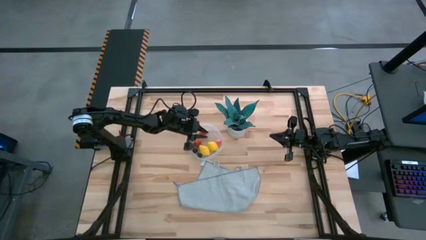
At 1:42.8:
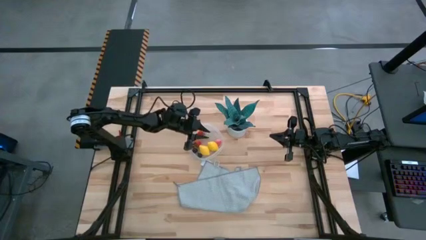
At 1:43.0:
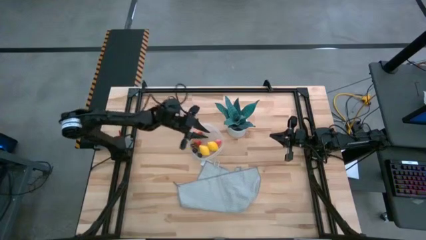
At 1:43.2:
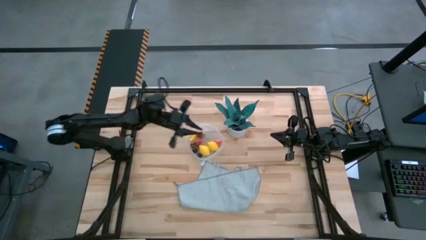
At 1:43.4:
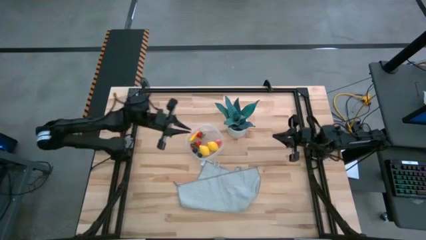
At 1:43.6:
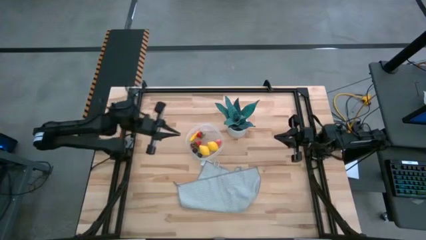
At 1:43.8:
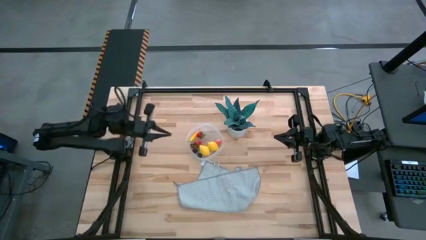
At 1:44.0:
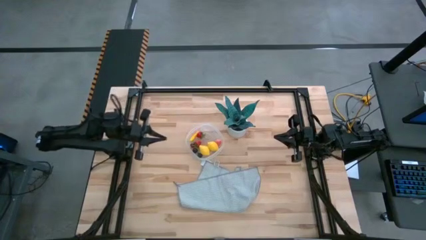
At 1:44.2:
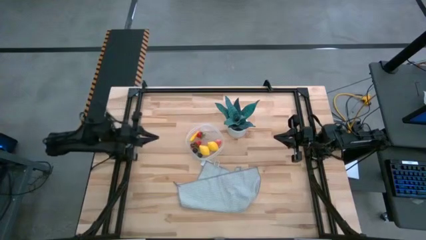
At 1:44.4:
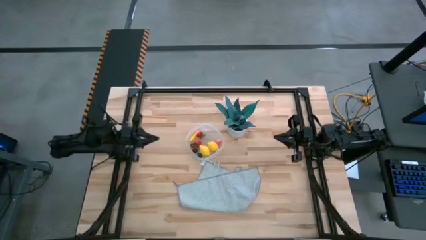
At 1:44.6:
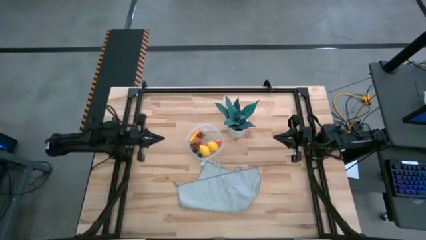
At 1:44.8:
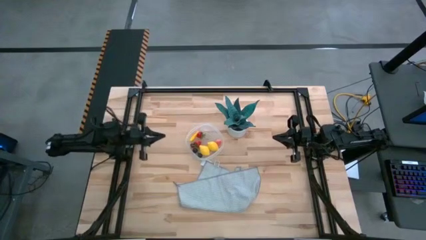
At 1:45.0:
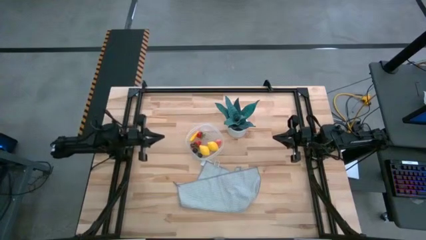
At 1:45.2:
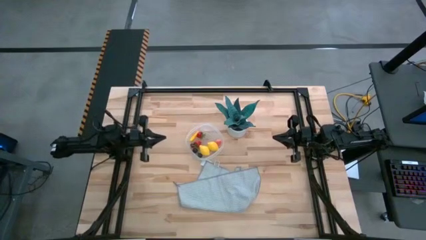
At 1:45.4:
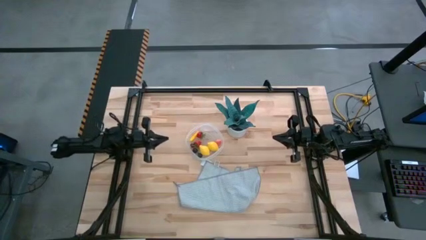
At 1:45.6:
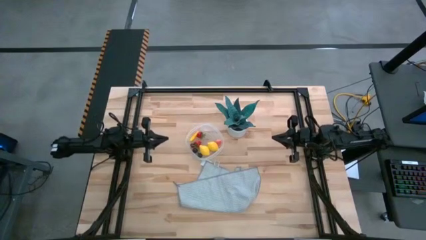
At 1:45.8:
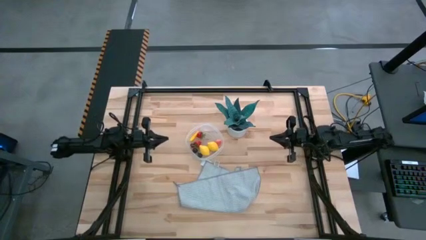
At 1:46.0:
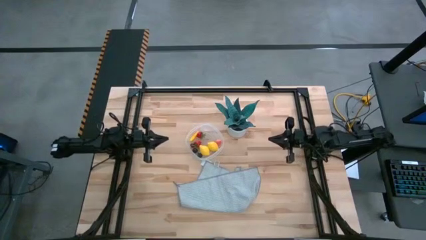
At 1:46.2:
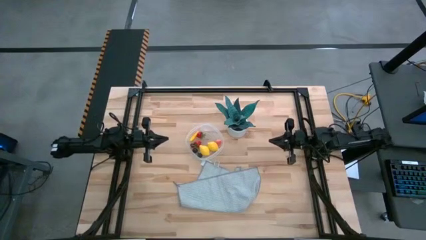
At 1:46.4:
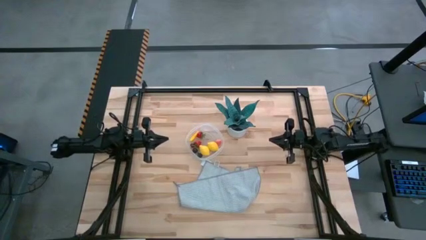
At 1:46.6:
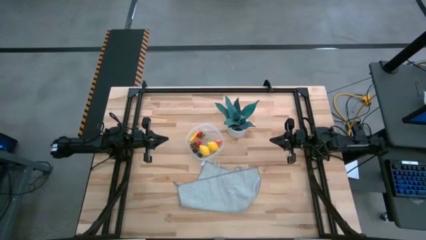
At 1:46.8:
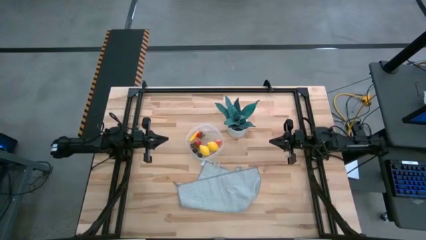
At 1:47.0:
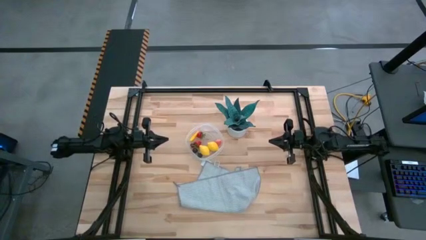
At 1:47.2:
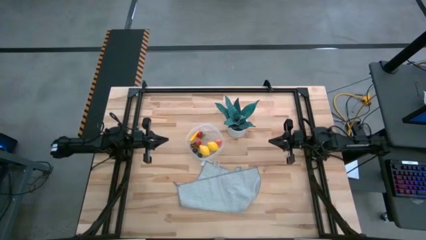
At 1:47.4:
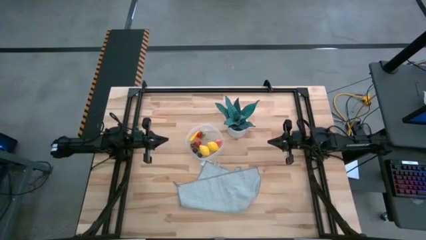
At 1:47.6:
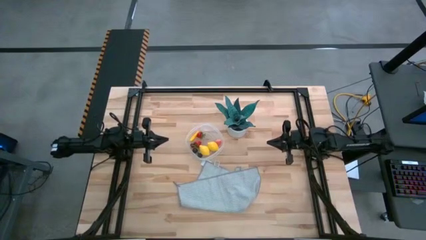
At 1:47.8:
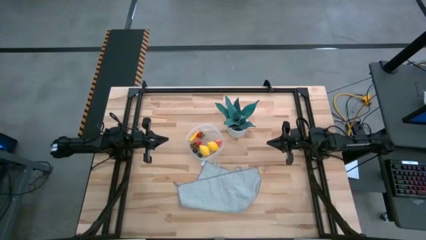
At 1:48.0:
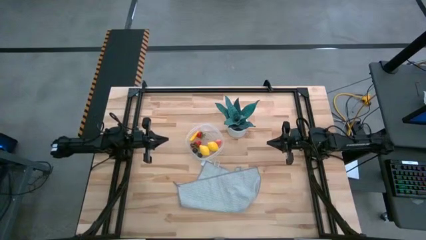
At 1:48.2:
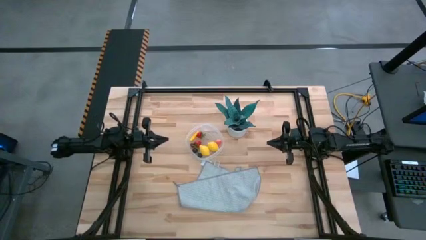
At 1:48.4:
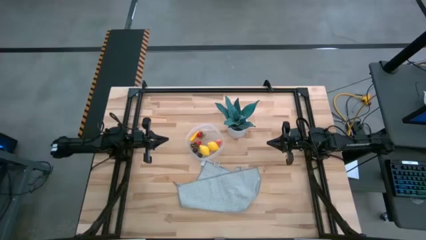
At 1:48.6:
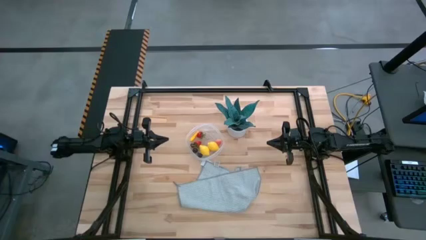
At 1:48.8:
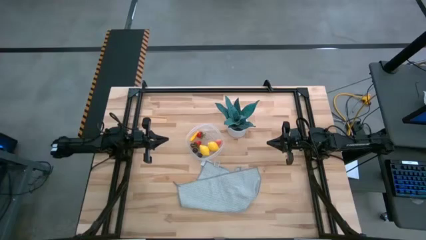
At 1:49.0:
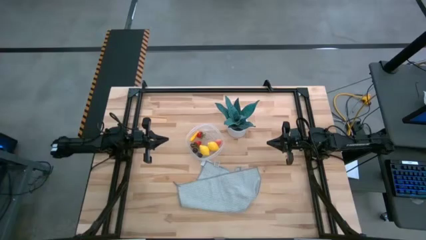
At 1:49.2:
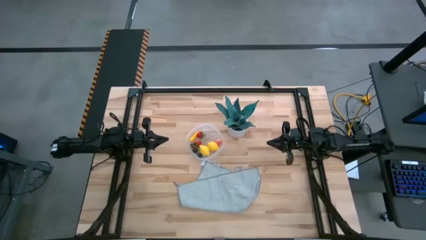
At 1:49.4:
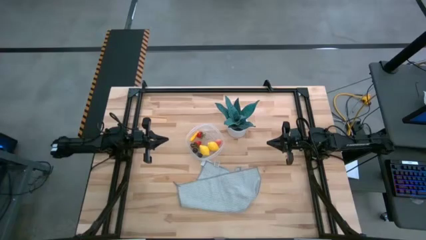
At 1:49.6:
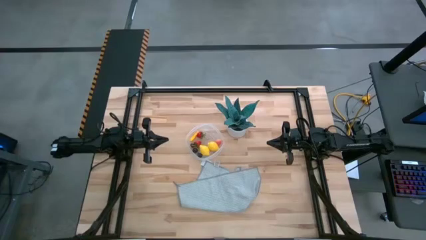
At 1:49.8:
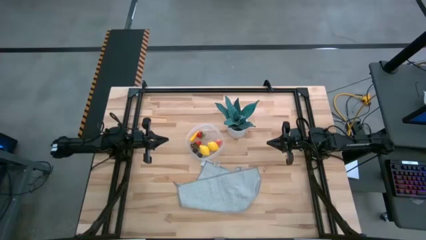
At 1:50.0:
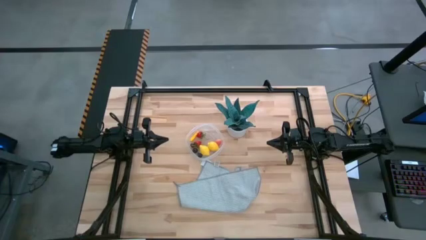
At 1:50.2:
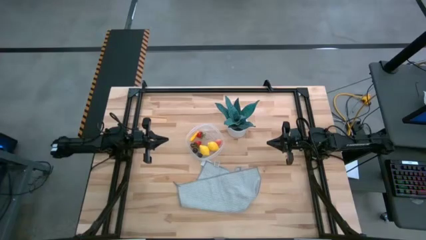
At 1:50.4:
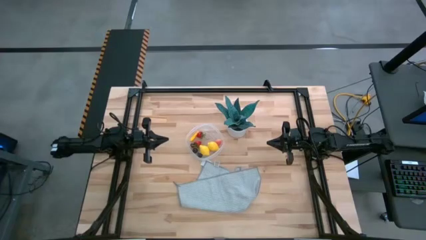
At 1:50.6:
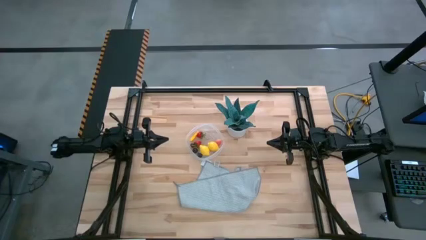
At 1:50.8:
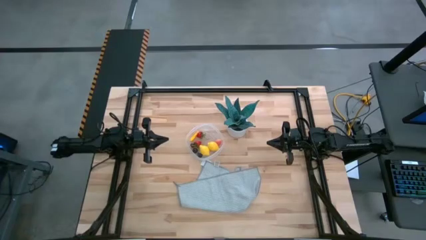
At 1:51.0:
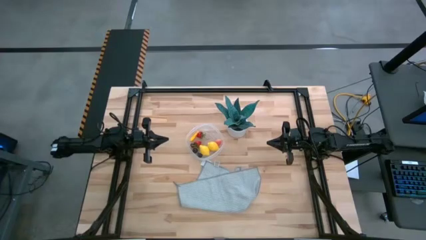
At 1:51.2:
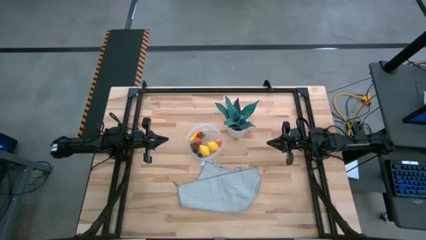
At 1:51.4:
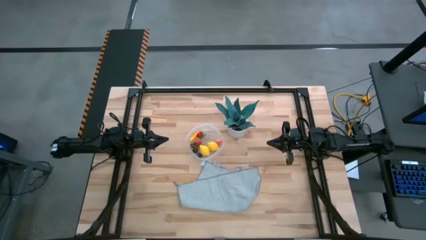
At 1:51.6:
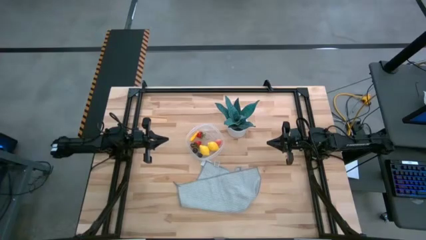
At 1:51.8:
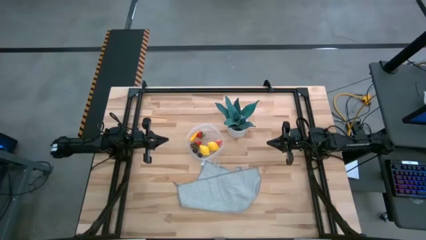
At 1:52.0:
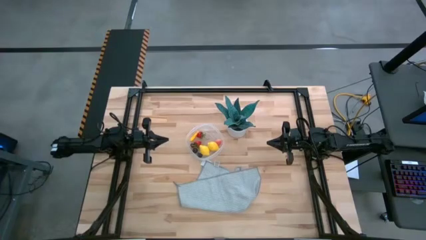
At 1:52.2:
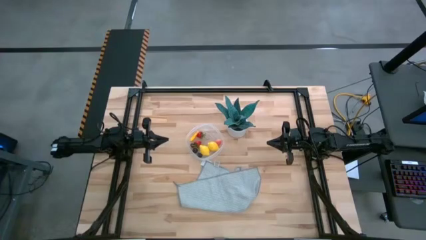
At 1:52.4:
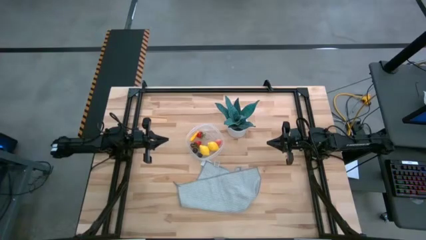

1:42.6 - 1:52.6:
Task: Pick and placing Produce into tupperware
Return to Home Position
